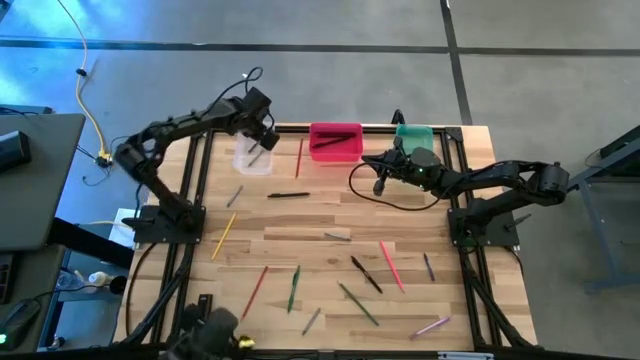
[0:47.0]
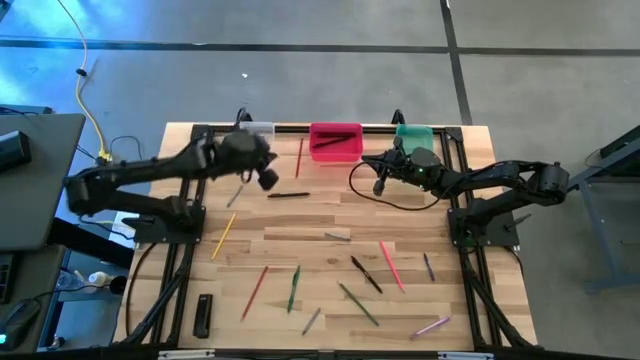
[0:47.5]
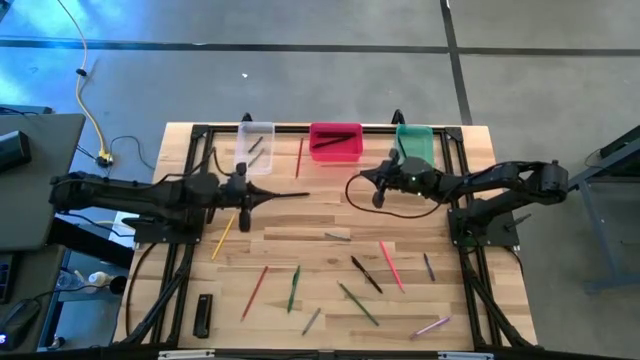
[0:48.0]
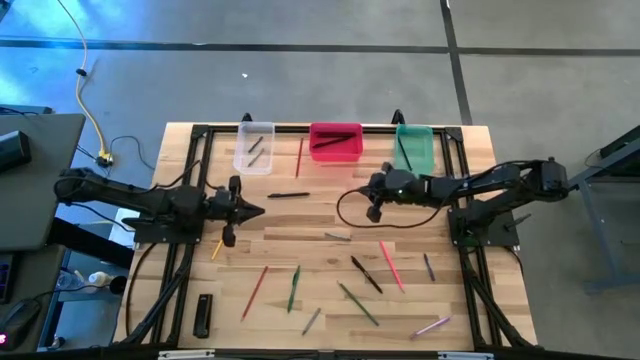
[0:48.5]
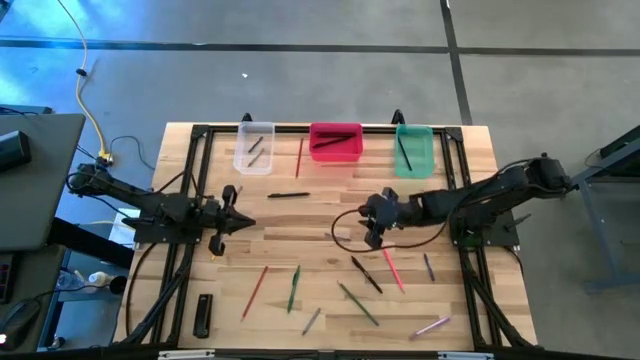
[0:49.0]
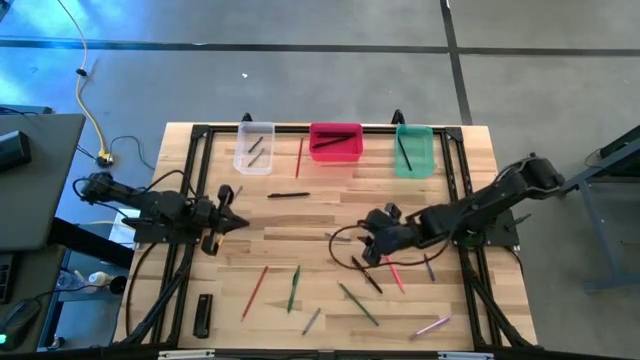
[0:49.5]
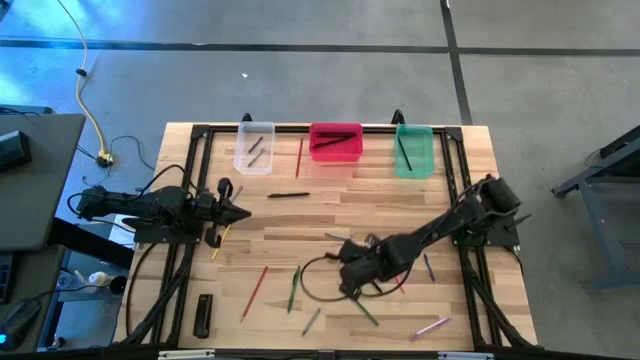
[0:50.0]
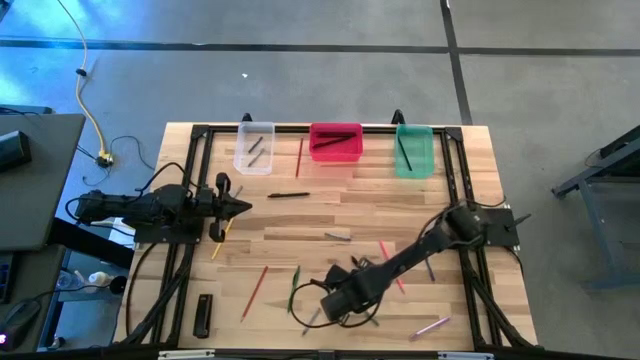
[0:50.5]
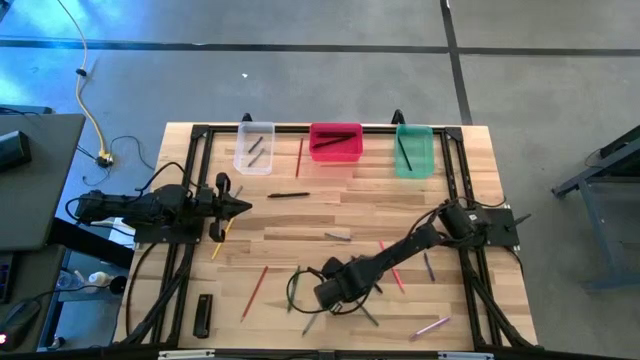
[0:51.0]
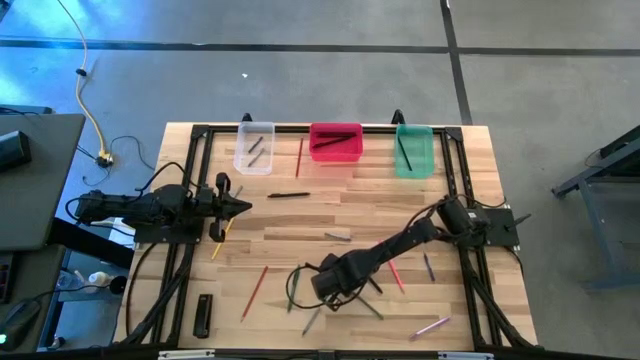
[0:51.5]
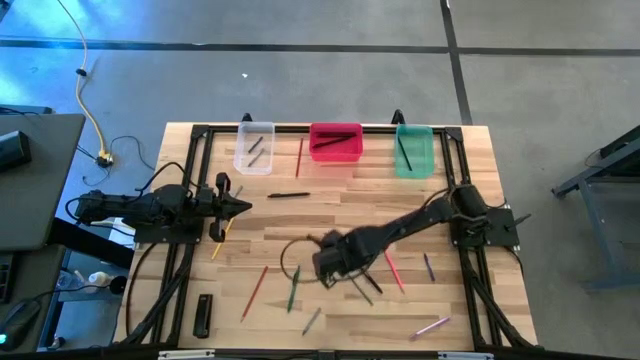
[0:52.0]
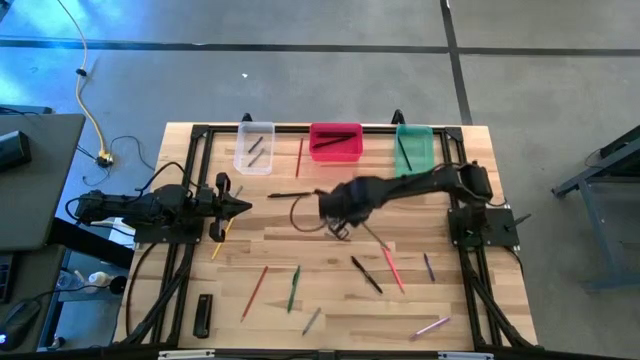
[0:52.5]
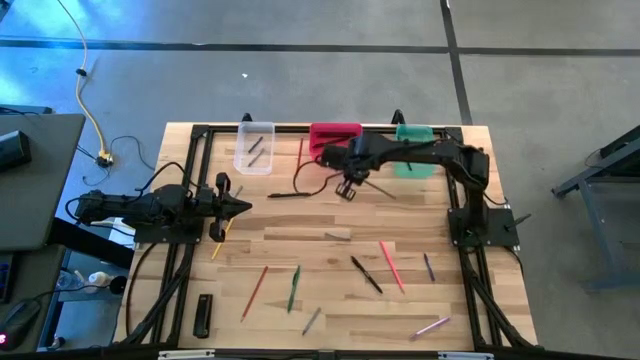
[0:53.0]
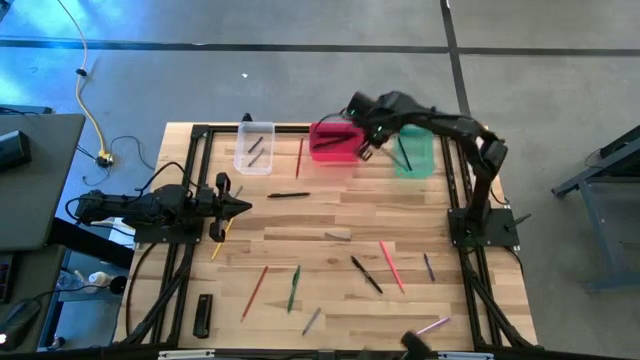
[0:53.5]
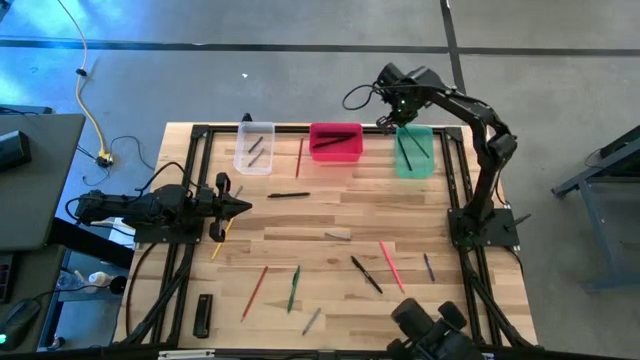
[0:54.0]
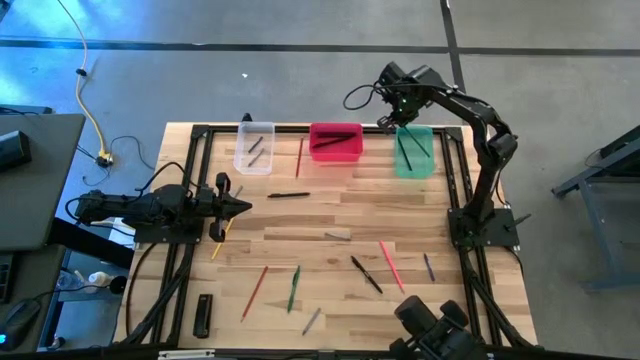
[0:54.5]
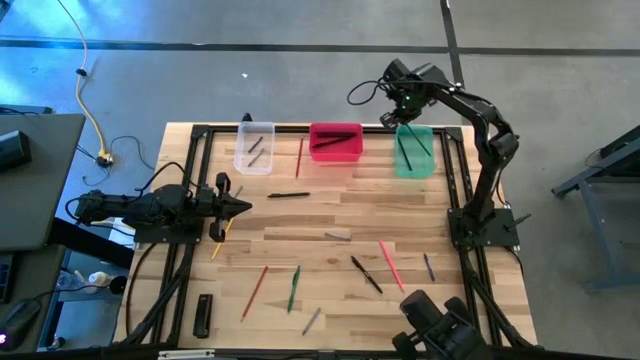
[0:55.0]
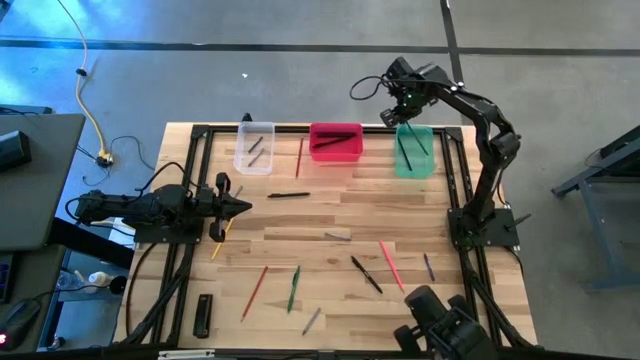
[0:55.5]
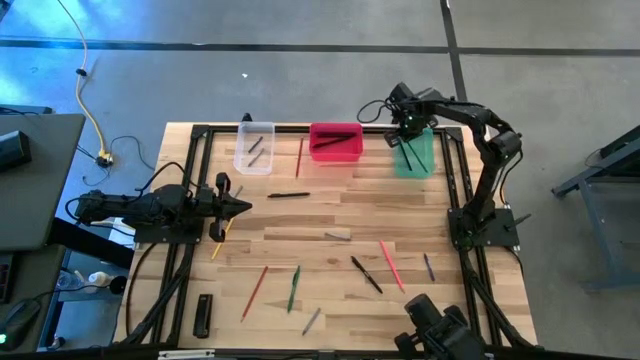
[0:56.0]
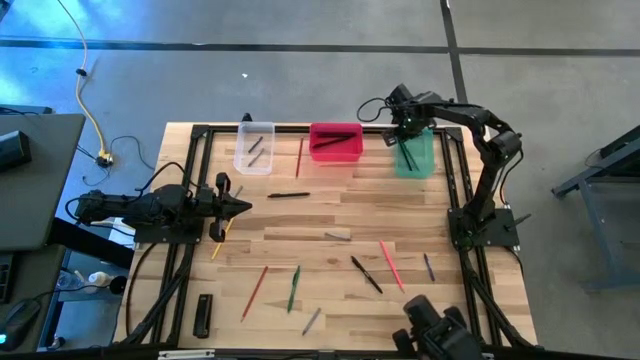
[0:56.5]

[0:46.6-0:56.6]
Task: Sort crayons/erasers/pens/pencils in bins
Put the green pencil into the blue bin

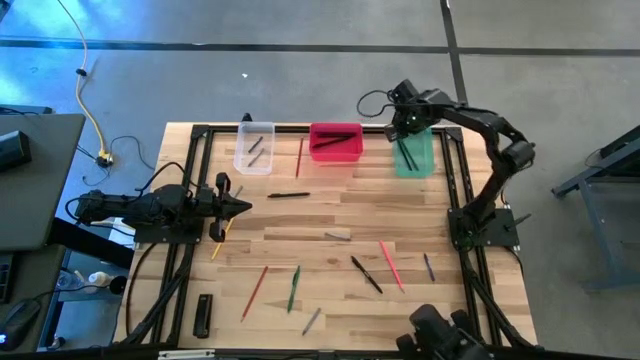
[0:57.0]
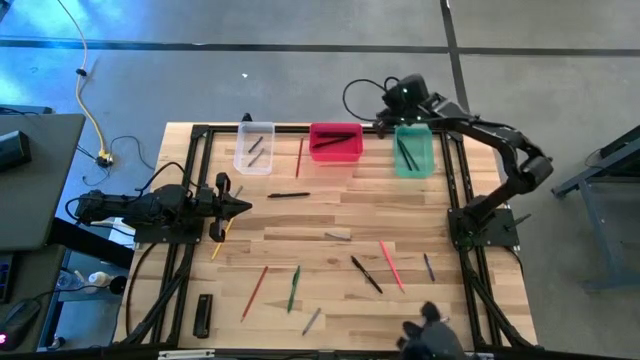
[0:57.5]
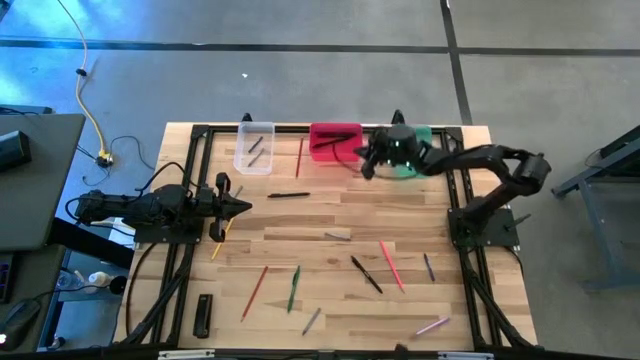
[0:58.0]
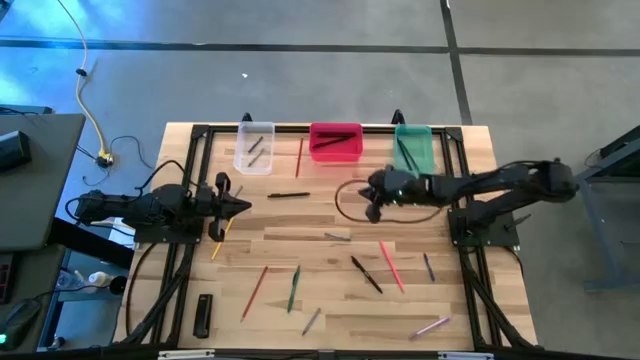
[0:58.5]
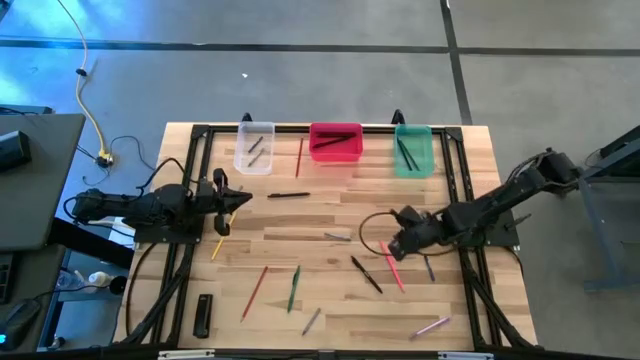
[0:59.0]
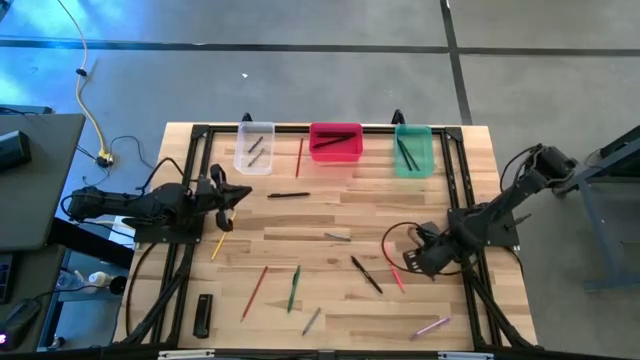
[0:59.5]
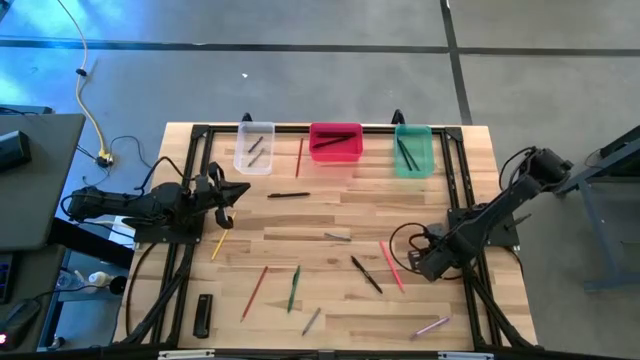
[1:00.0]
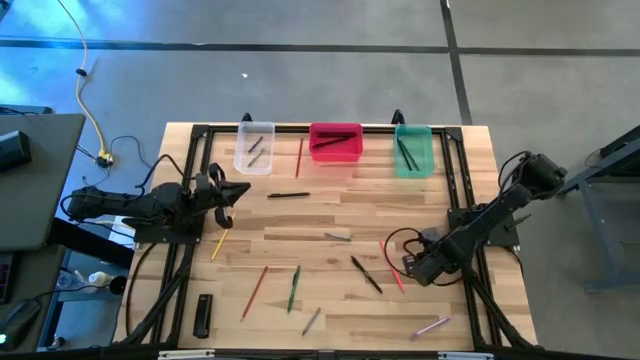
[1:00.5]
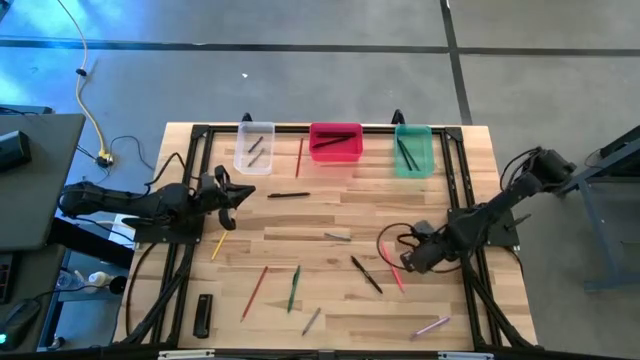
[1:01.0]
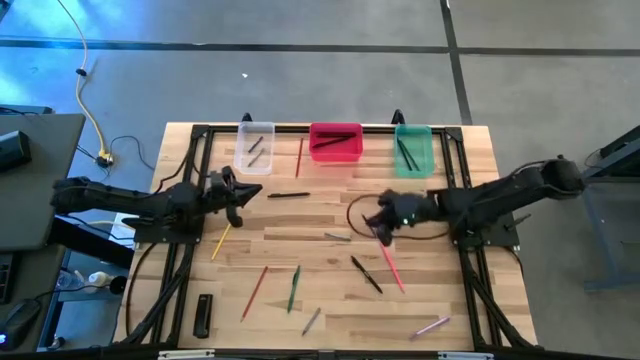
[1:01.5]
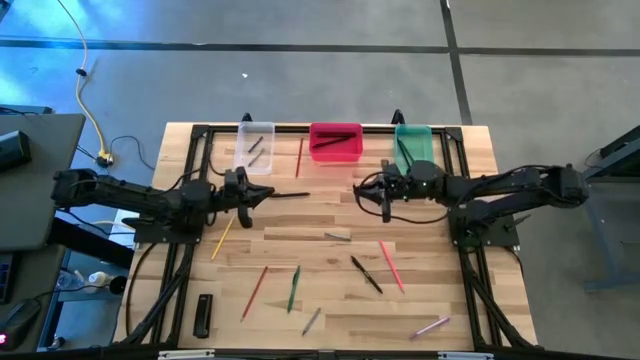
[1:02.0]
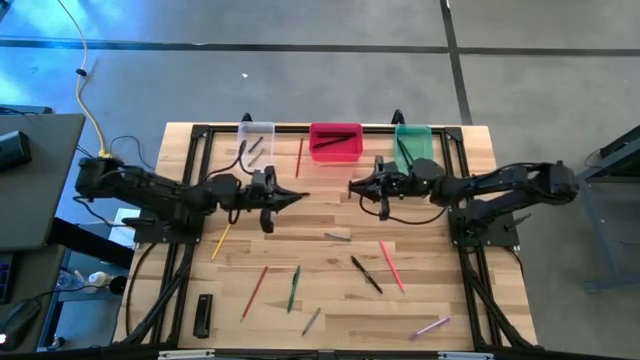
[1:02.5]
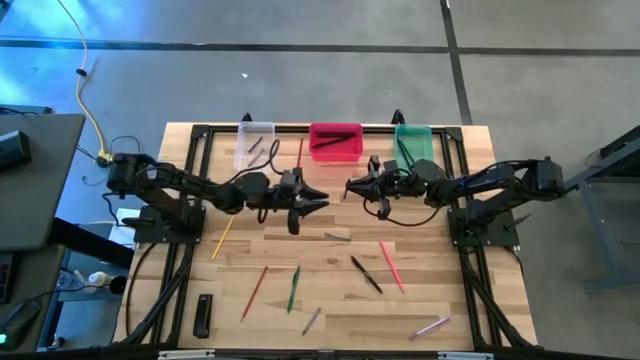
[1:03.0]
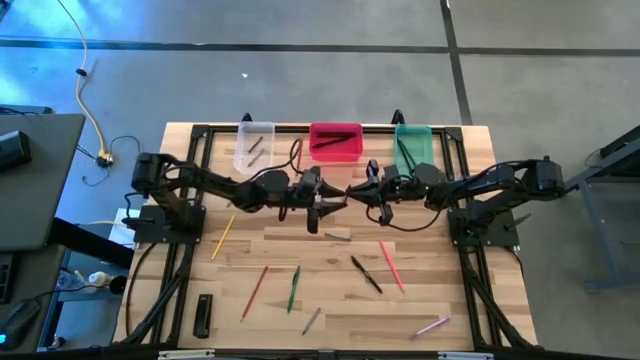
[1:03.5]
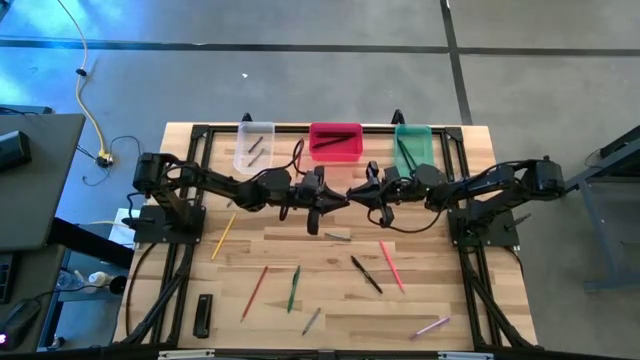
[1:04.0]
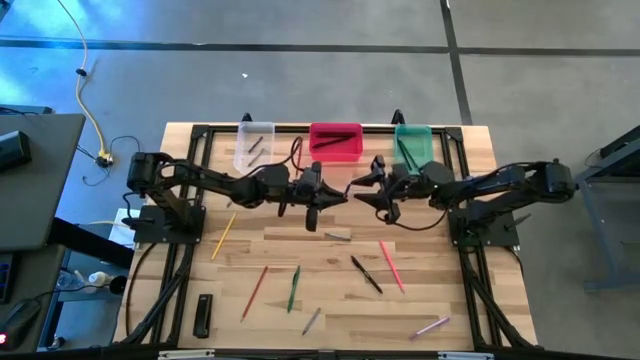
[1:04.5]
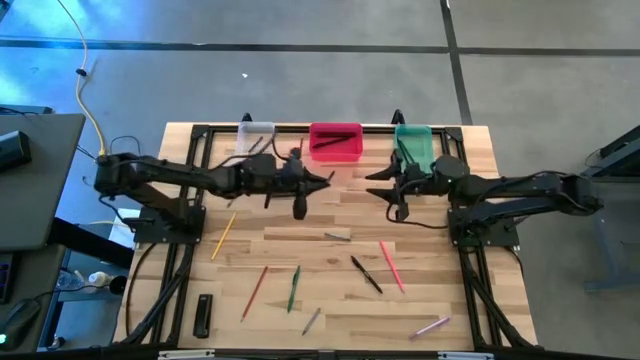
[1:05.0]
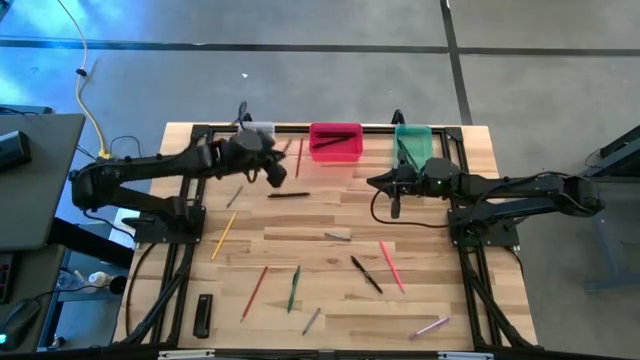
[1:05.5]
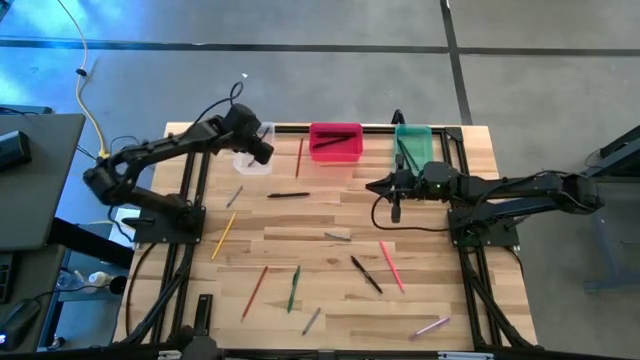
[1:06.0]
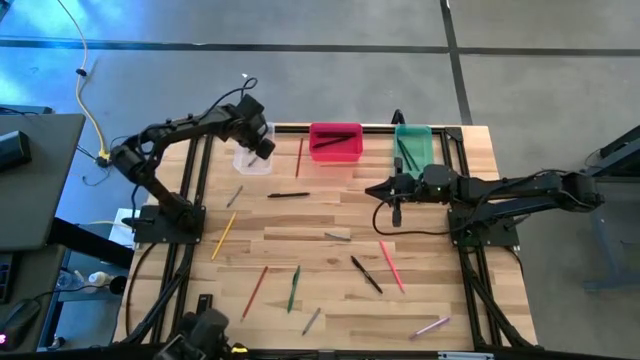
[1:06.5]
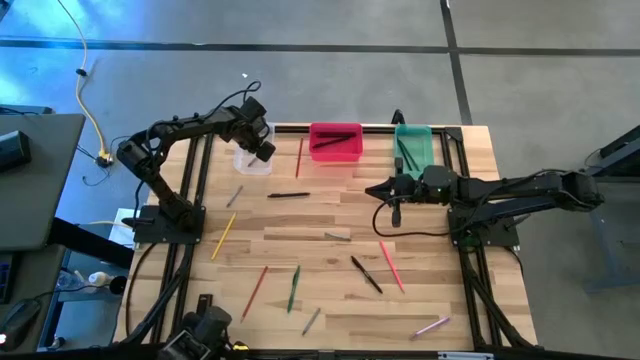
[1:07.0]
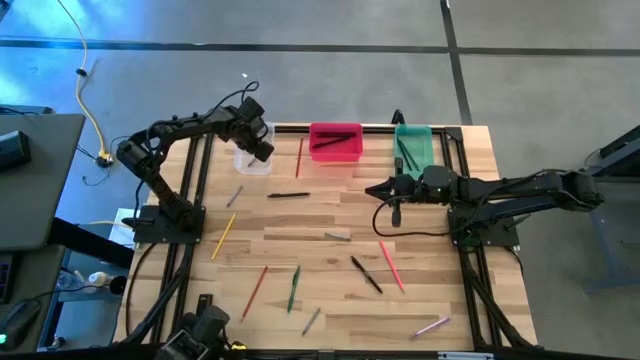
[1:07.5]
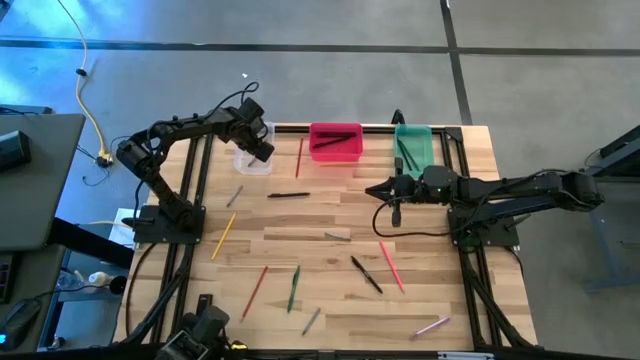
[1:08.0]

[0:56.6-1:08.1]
Put the blue crayon into the transparent bin
